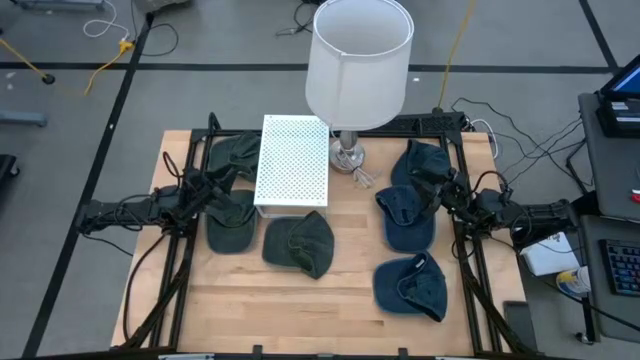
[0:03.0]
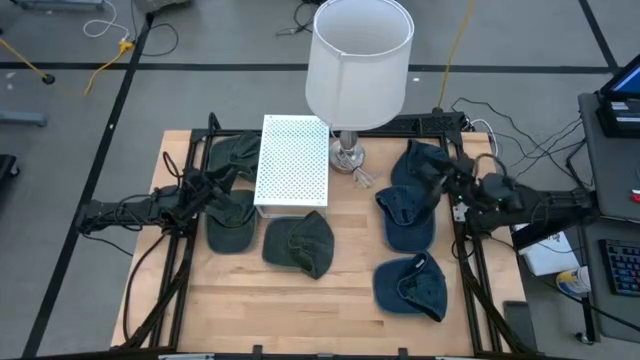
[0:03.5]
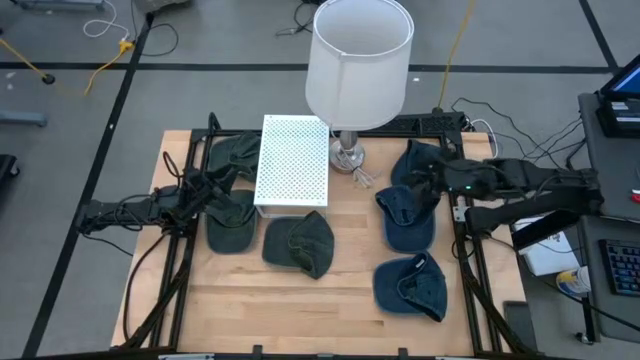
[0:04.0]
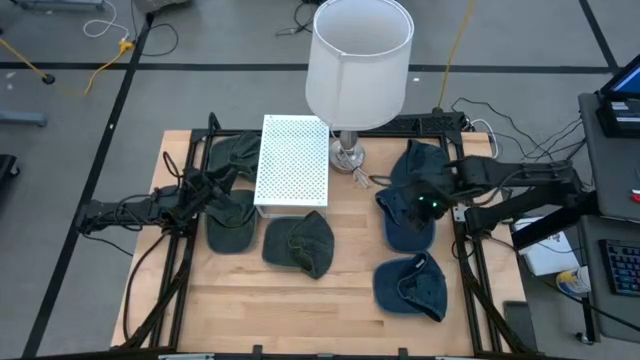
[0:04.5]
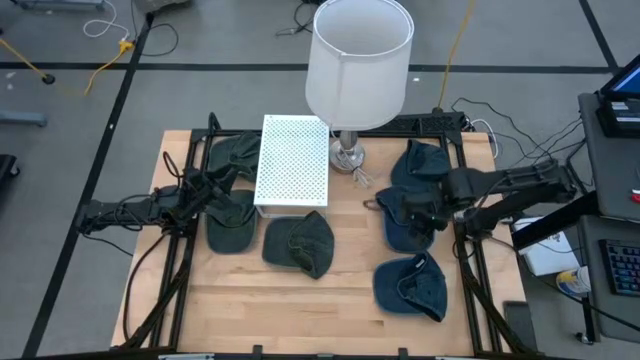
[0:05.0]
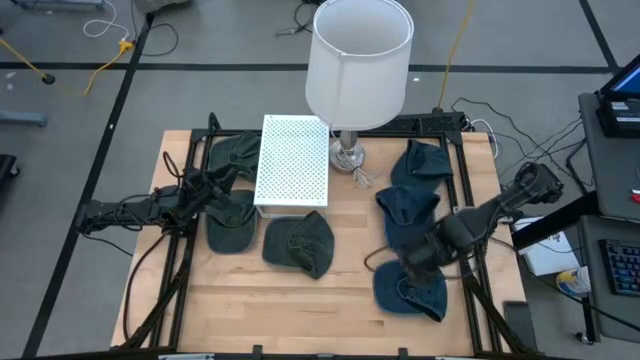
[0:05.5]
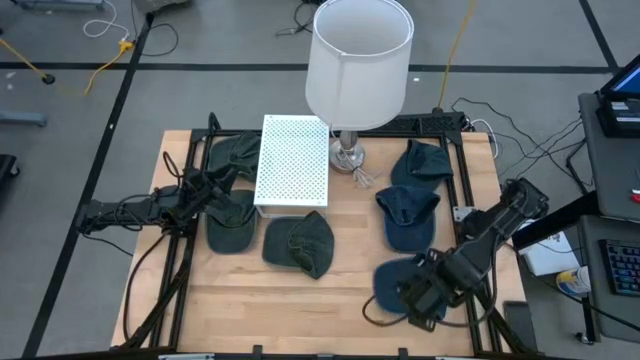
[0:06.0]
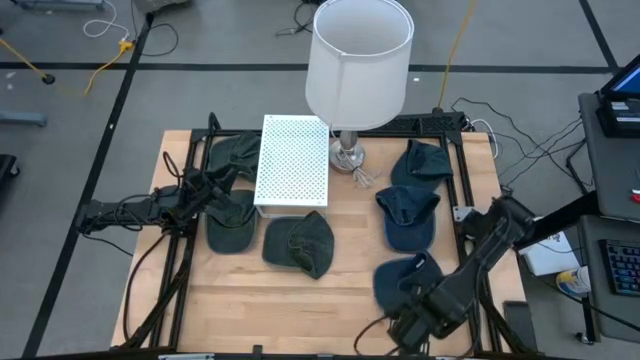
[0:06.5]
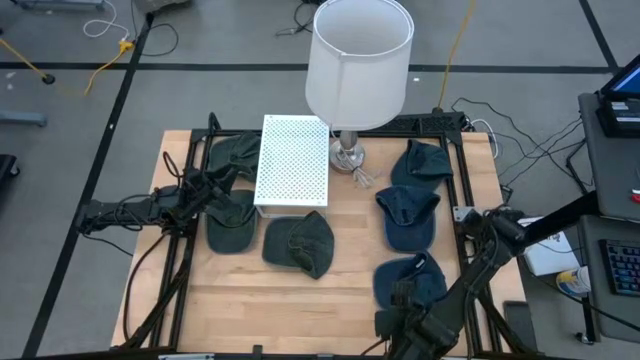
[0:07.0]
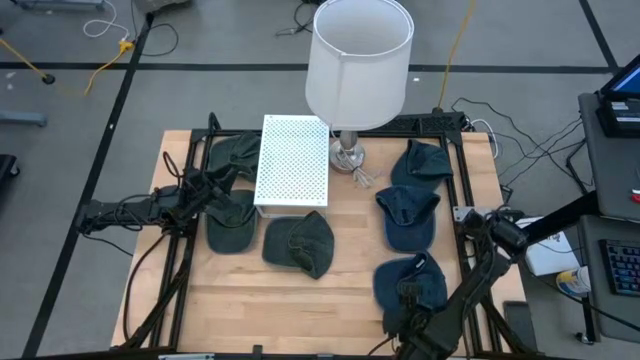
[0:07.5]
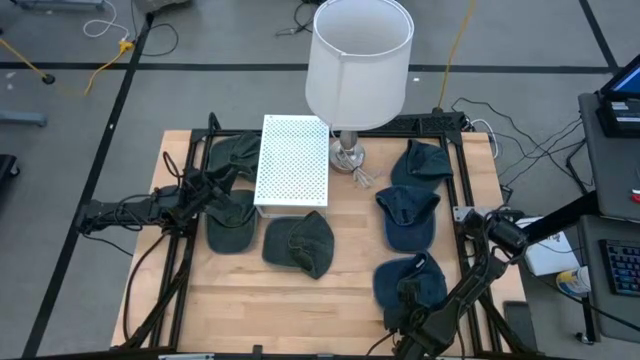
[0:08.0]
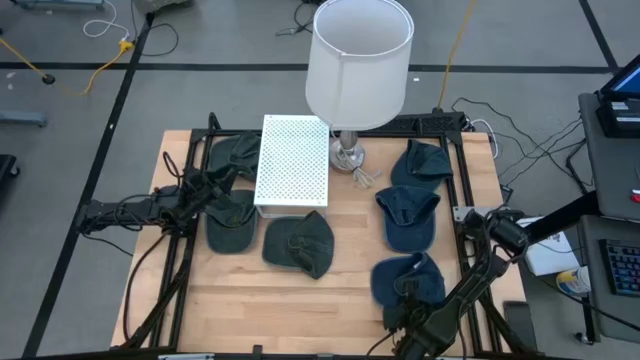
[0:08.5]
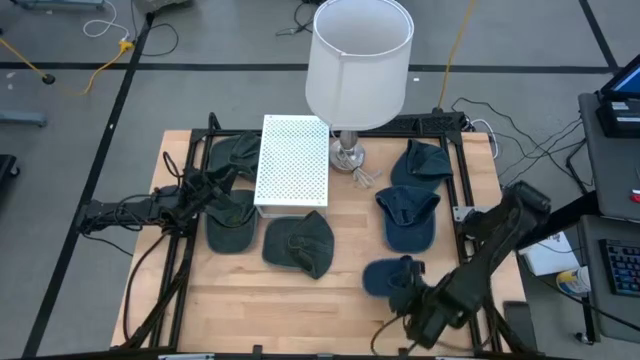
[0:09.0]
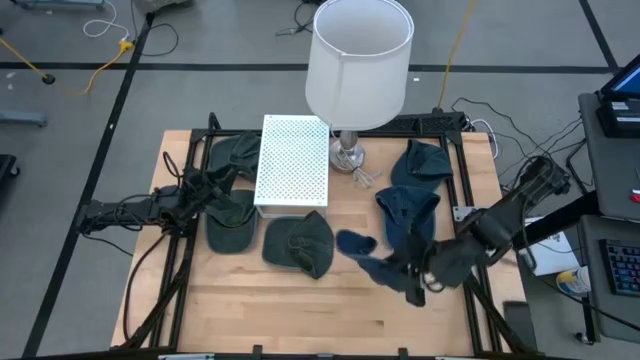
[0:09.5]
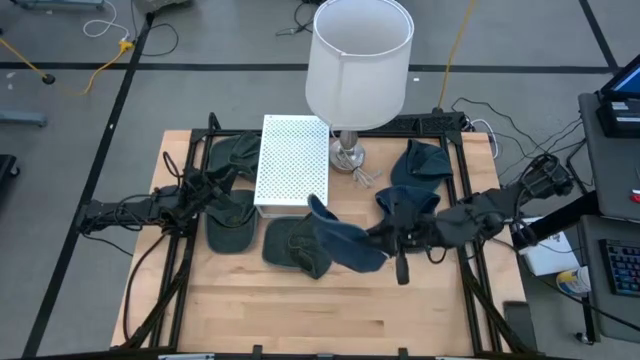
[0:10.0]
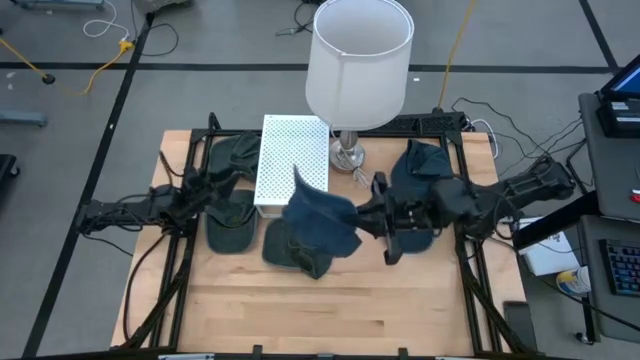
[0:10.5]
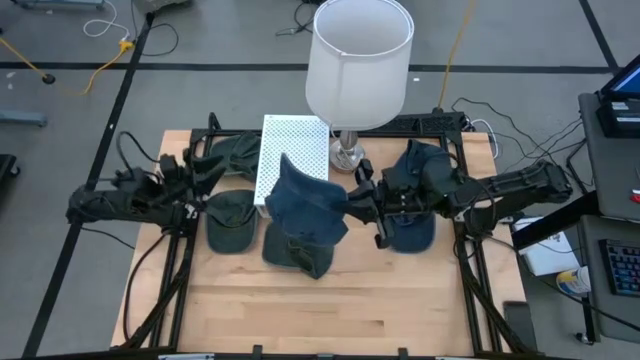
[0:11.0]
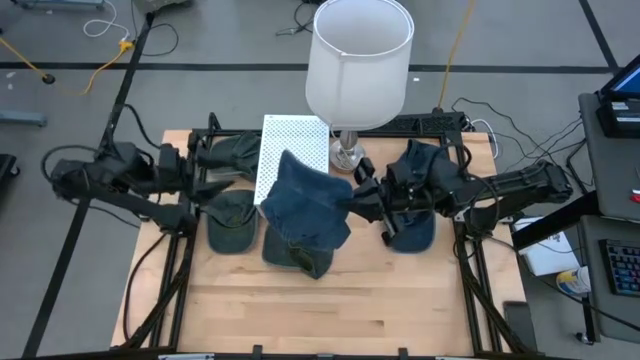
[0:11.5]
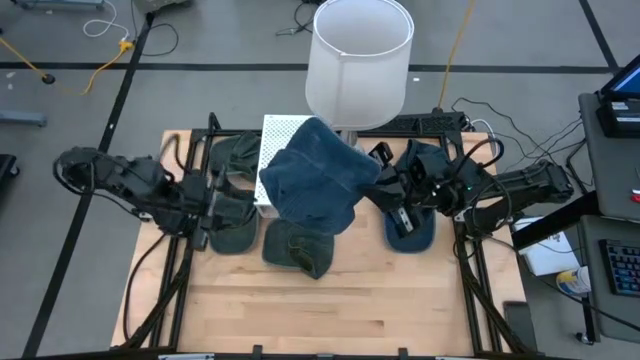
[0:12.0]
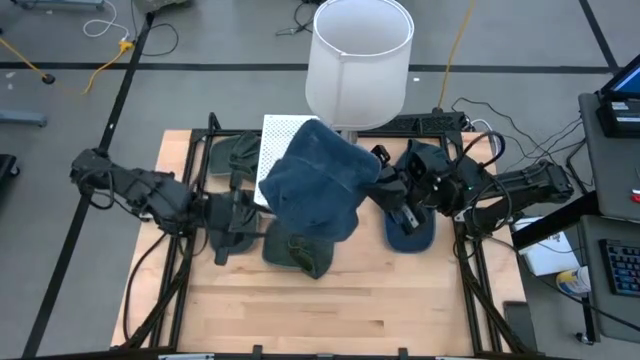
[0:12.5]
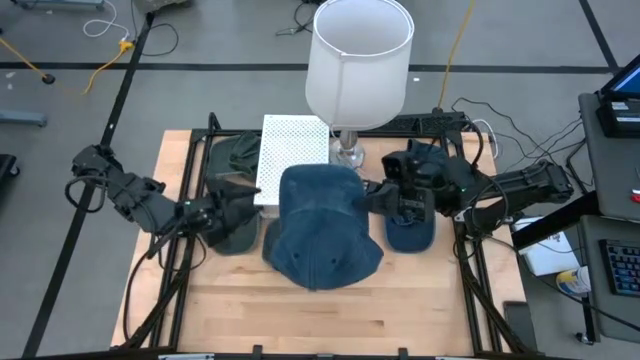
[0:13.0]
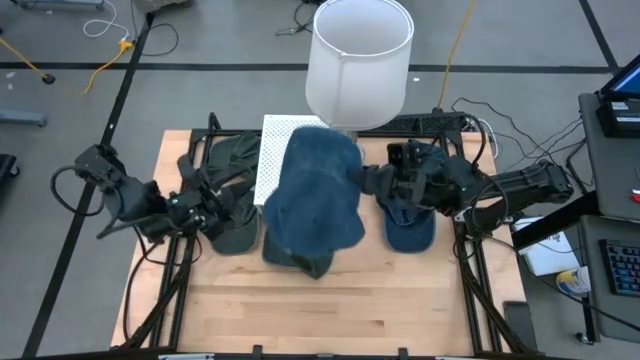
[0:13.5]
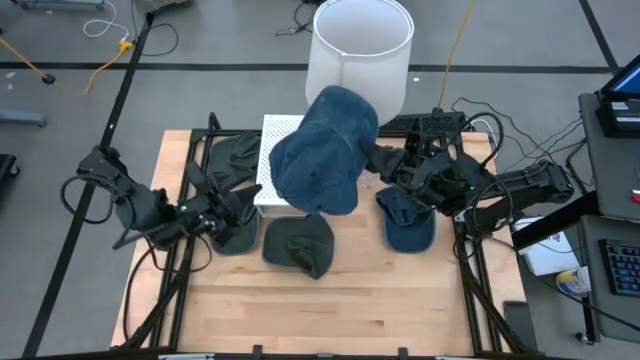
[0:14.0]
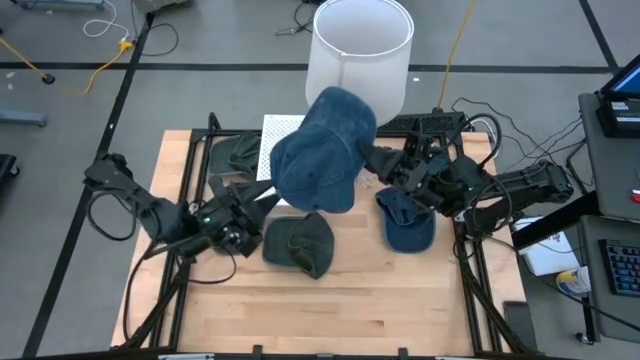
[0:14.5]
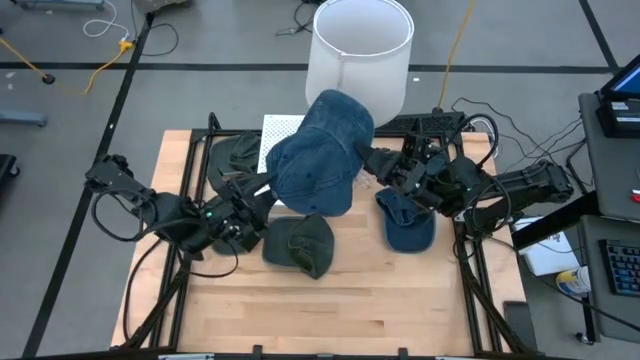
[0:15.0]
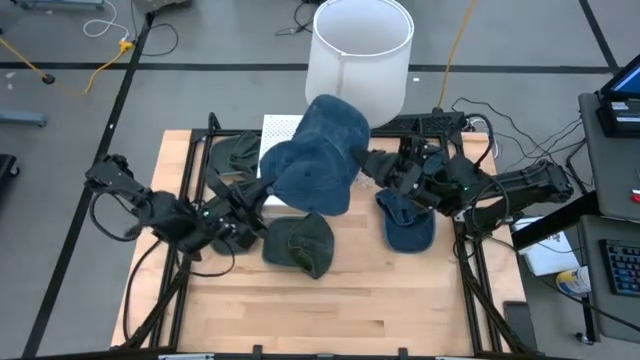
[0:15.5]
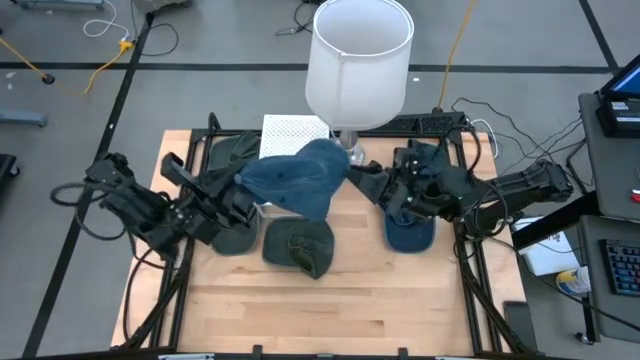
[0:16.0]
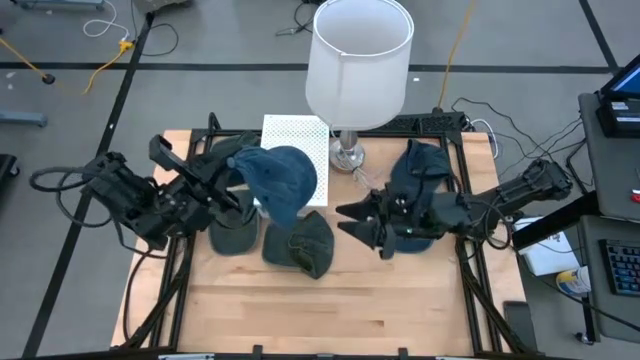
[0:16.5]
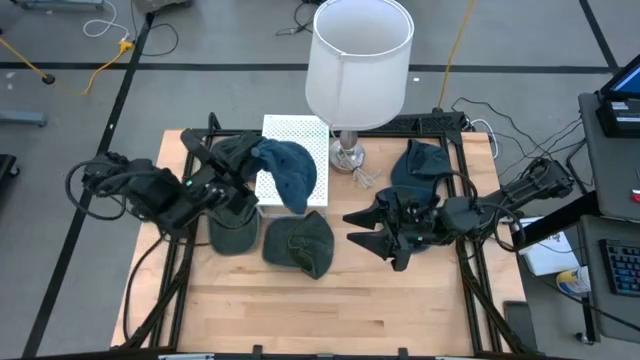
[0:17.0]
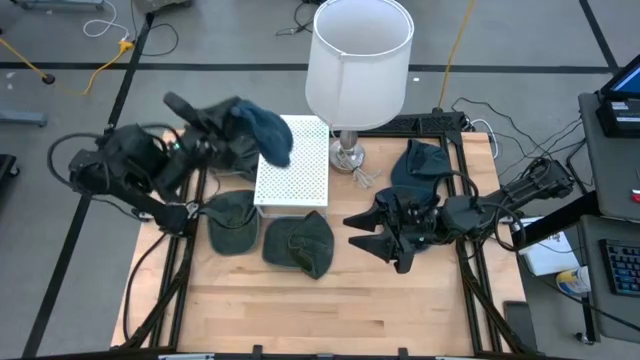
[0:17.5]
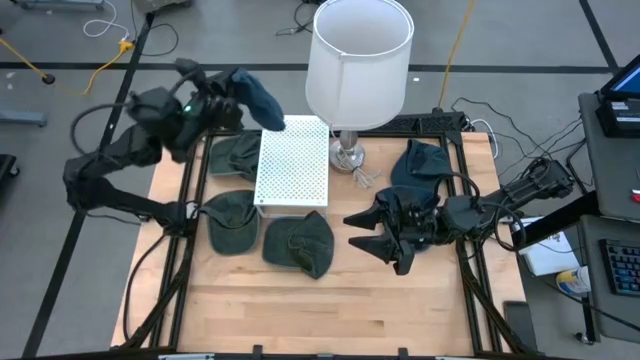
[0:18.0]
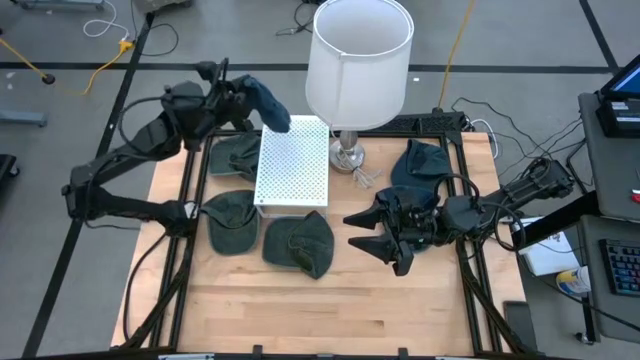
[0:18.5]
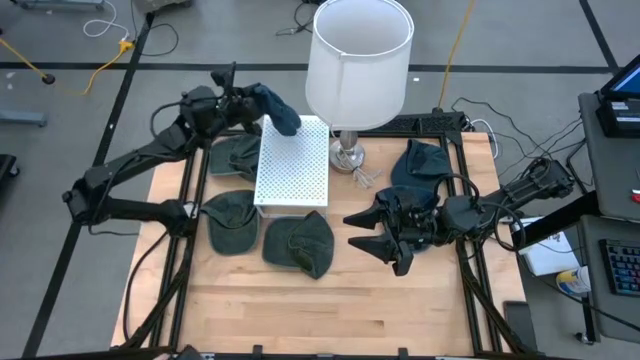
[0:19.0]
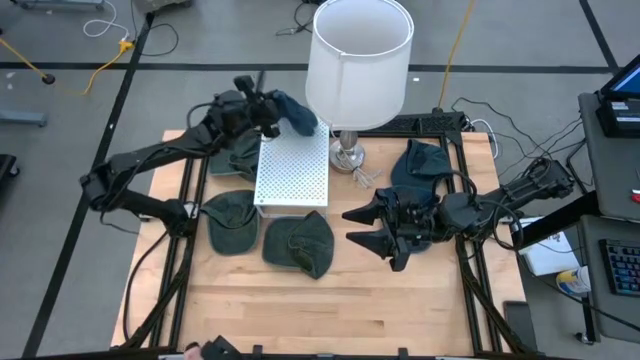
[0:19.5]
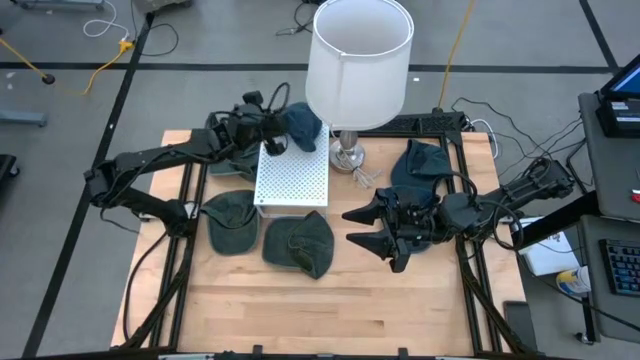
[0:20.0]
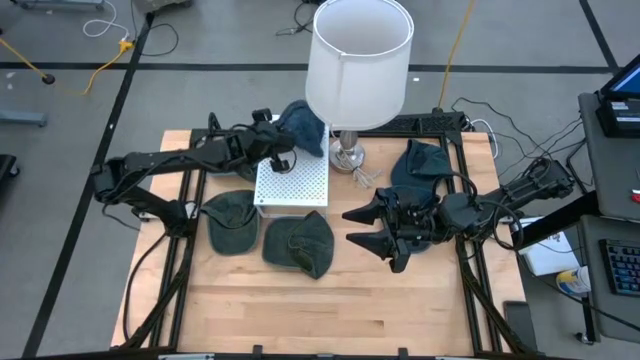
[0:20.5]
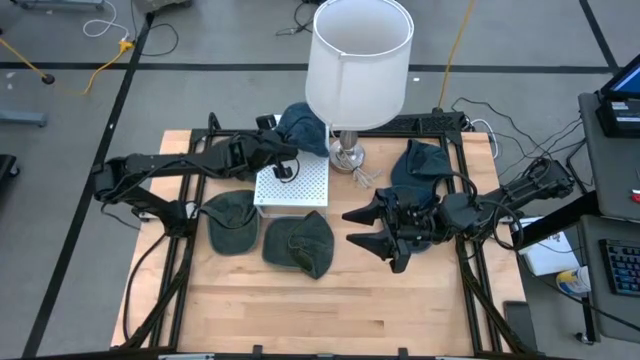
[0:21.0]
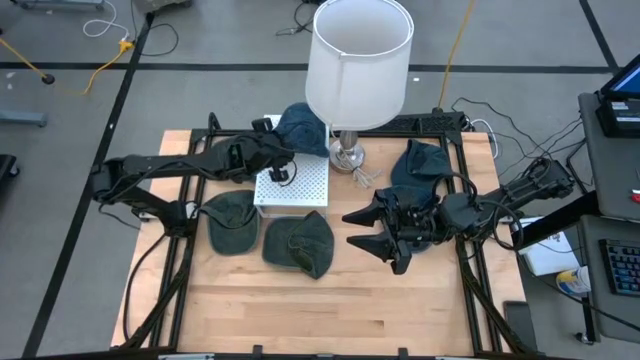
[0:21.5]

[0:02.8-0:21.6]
Task: Pick & Place hat
Put the bottom blue cap on the shelf
